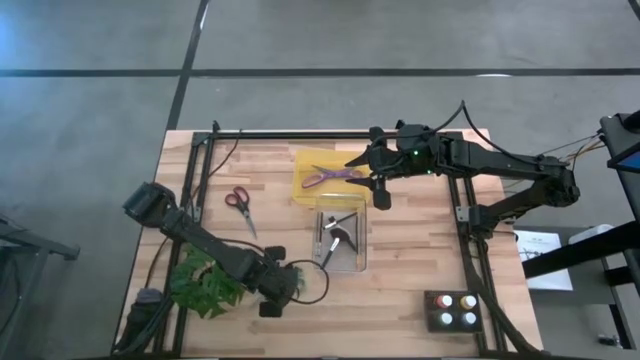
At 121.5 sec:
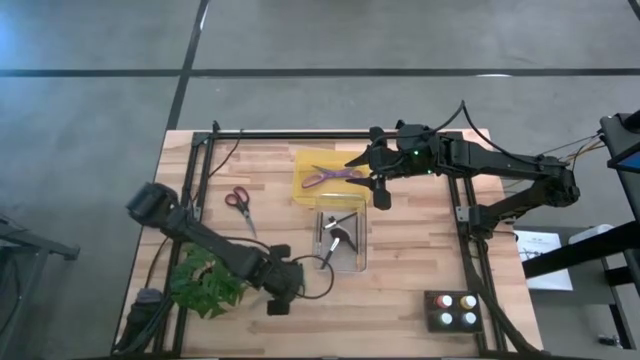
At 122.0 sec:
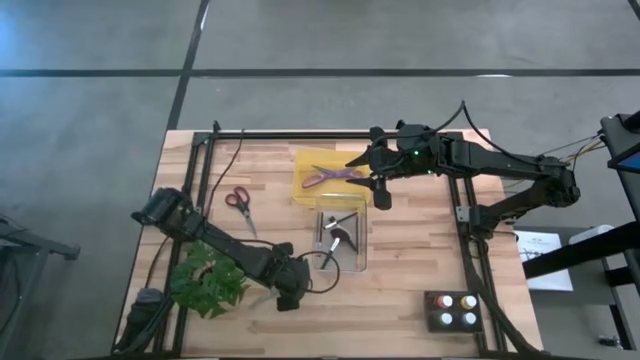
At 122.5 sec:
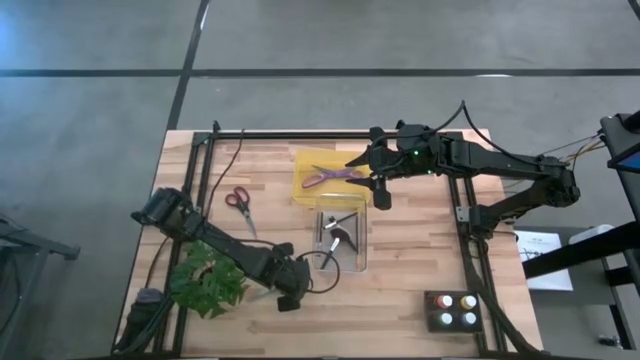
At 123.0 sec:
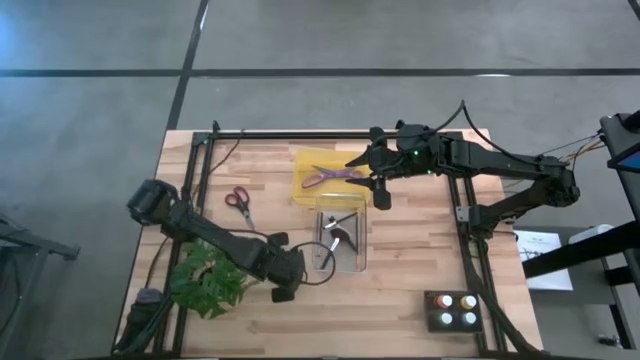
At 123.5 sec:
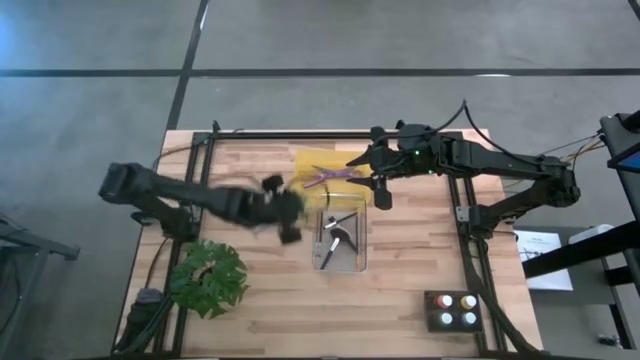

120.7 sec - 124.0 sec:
Task: Pick & Place Paint Supplies
Put the green scissors into the yellow bin

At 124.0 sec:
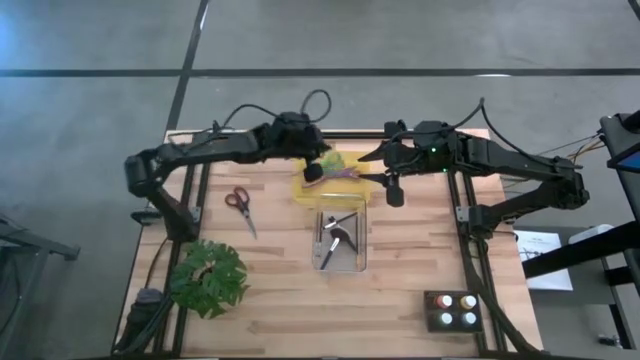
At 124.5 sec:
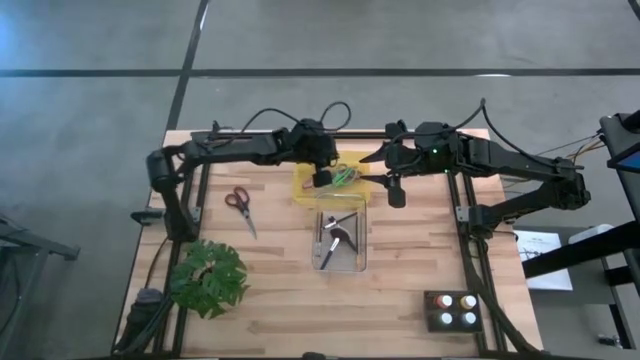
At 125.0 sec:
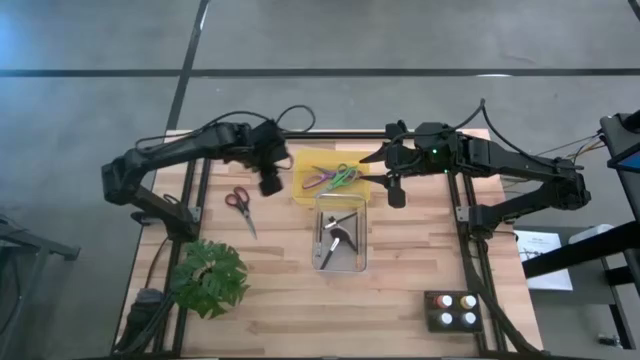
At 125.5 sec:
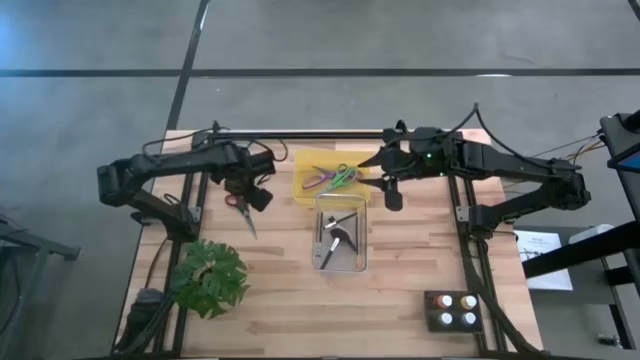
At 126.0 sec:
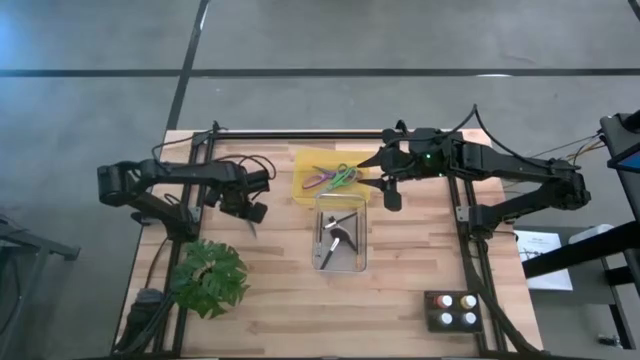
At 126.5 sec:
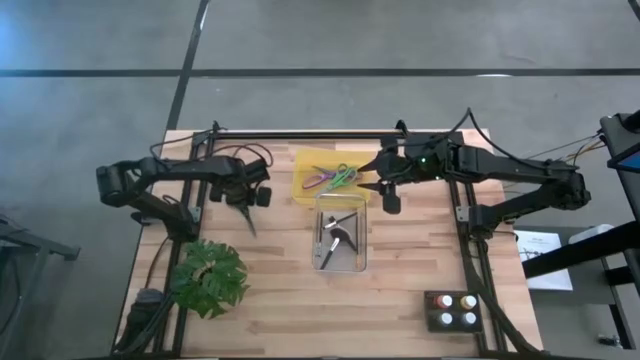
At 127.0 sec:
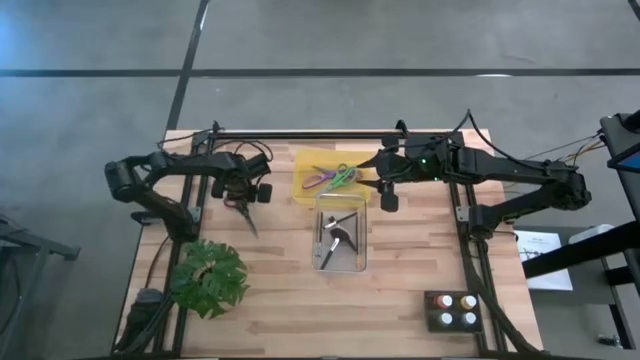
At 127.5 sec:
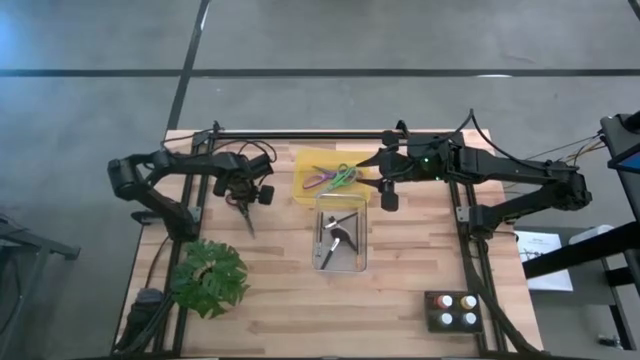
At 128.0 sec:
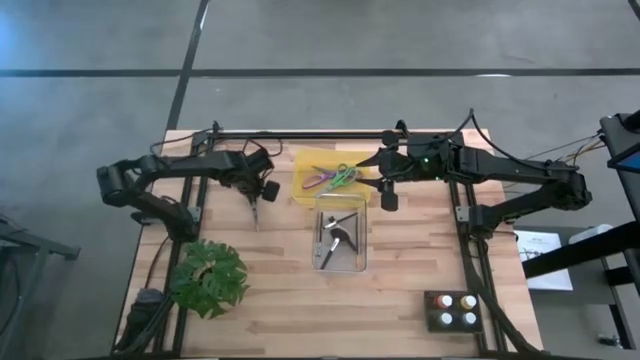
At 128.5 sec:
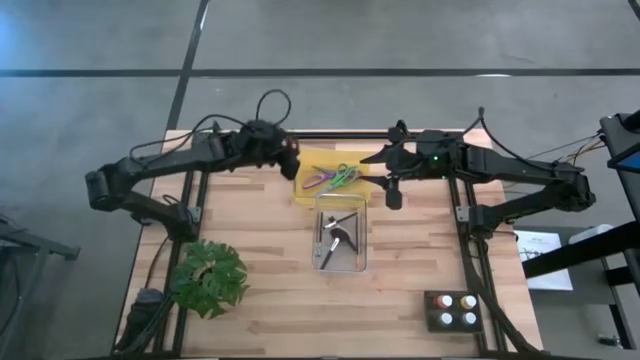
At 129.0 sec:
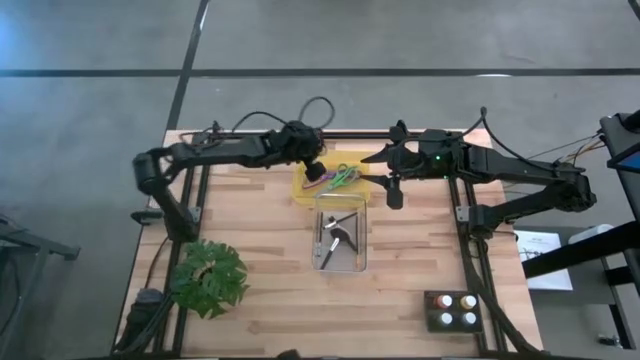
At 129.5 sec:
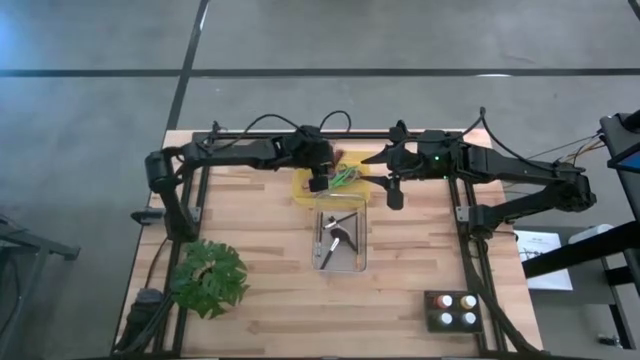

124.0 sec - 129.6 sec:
Put the black scissors into the yellow bin

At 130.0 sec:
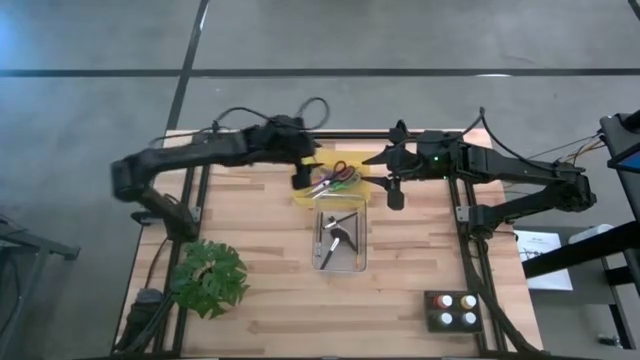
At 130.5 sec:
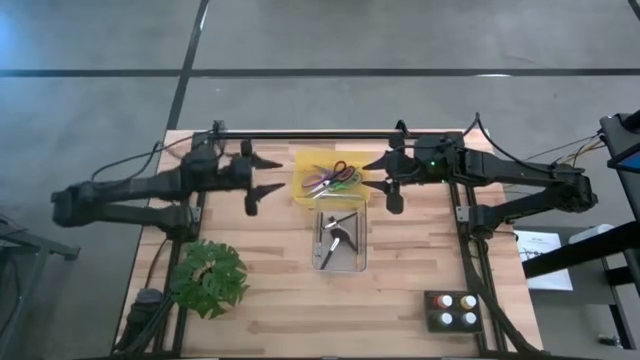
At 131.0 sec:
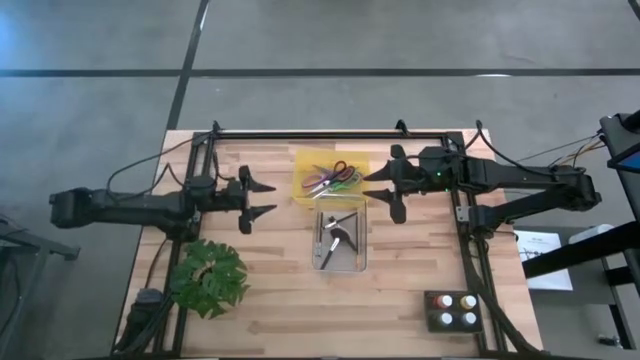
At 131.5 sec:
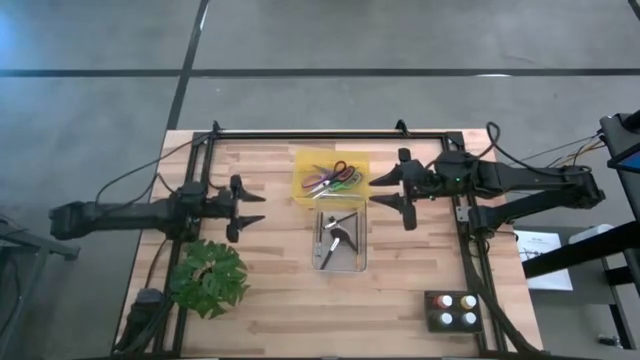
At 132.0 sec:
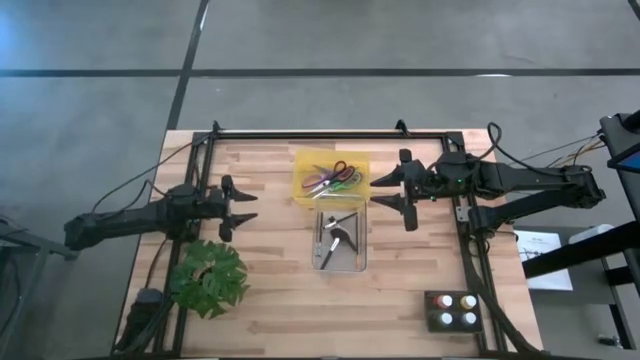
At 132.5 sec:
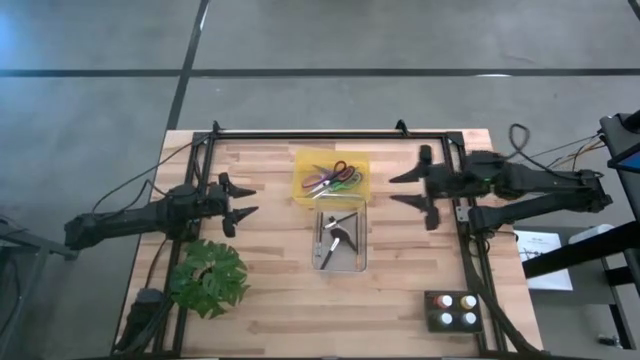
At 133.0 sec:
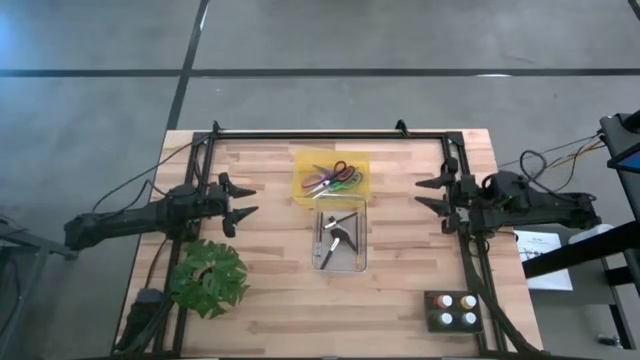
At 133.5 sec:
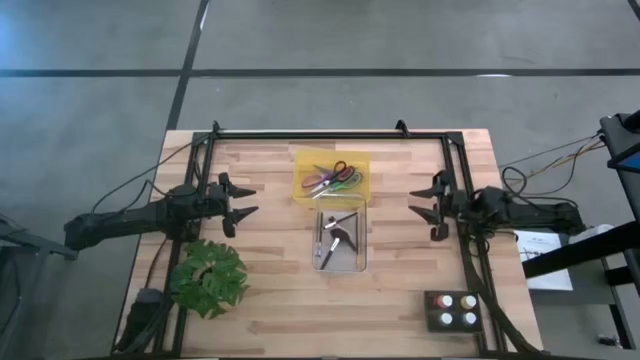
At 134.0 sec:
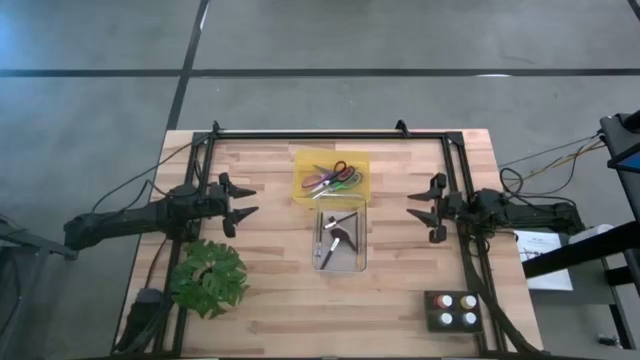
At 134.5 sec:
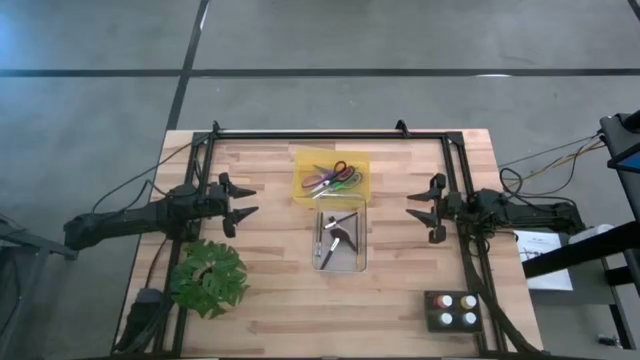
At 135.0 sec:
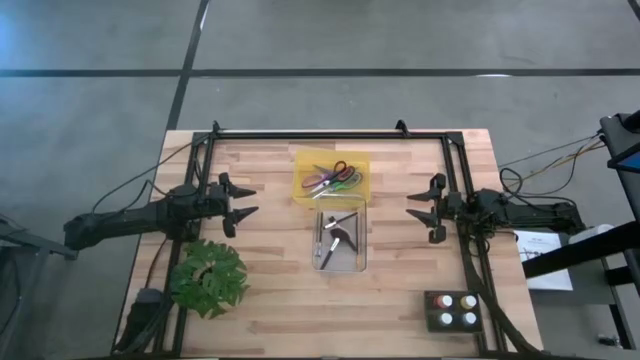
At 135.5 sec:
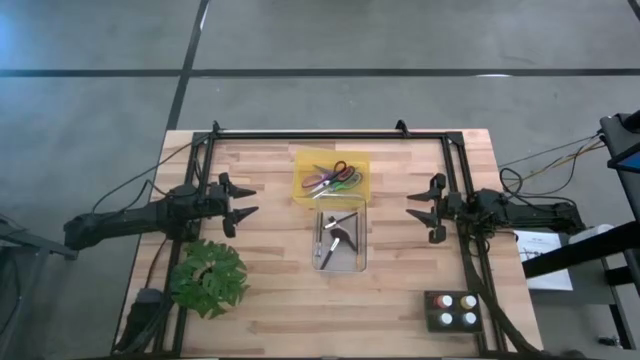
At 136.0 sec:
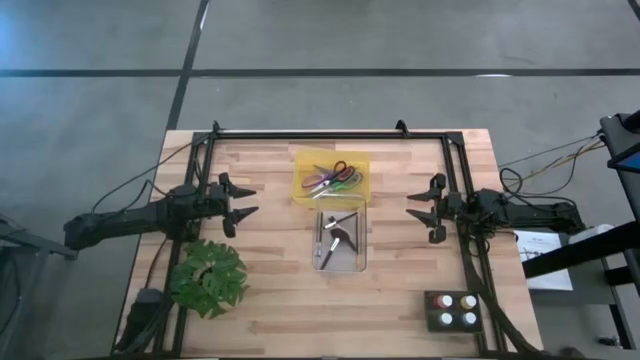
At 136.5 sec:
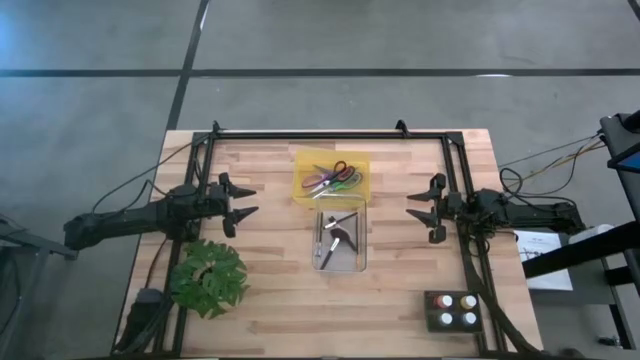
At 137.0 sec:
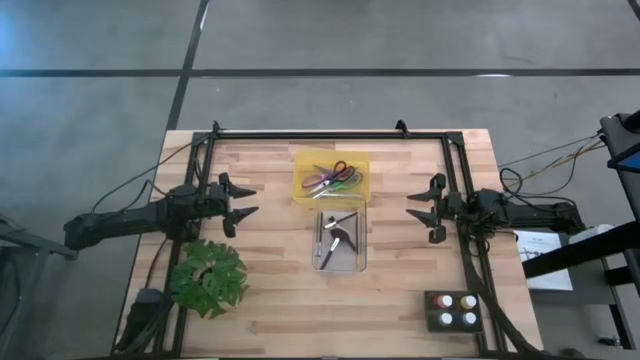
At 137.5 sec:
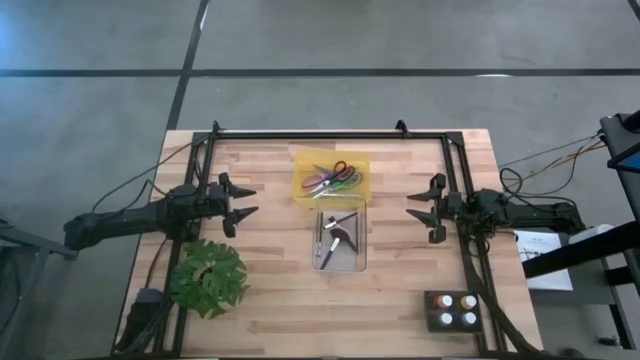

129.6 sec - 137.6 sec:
Return to Home Position

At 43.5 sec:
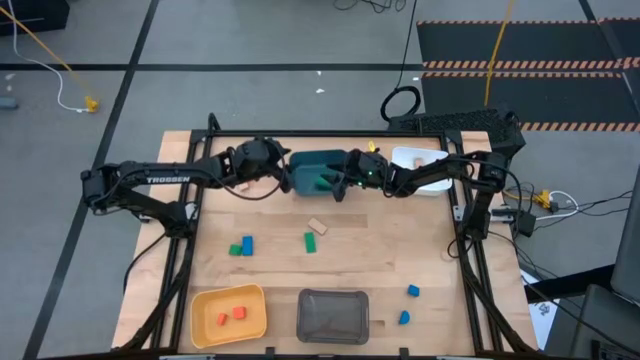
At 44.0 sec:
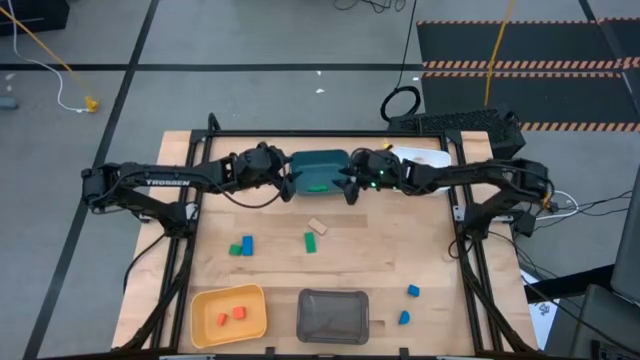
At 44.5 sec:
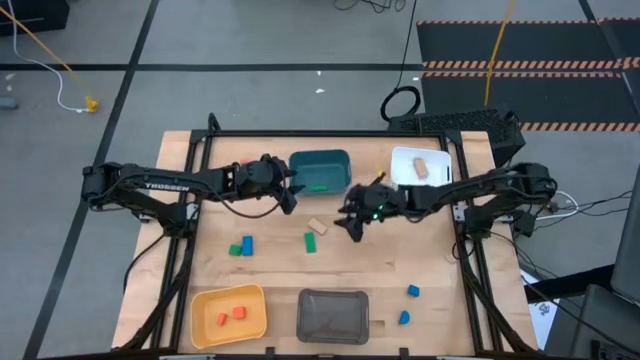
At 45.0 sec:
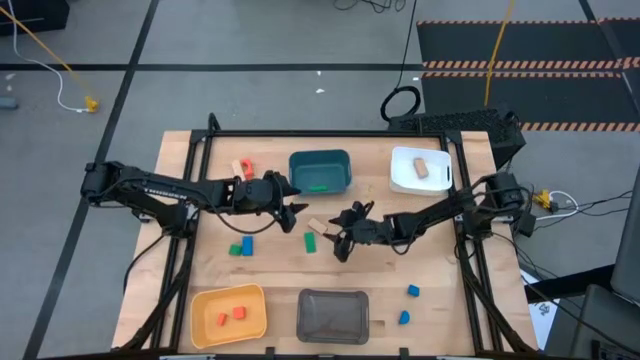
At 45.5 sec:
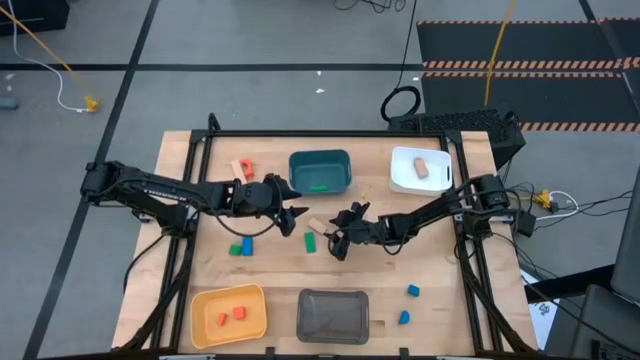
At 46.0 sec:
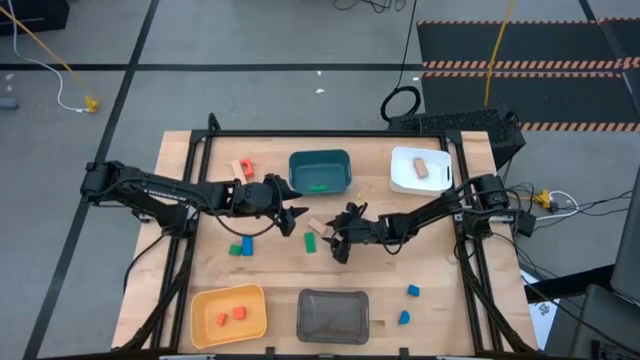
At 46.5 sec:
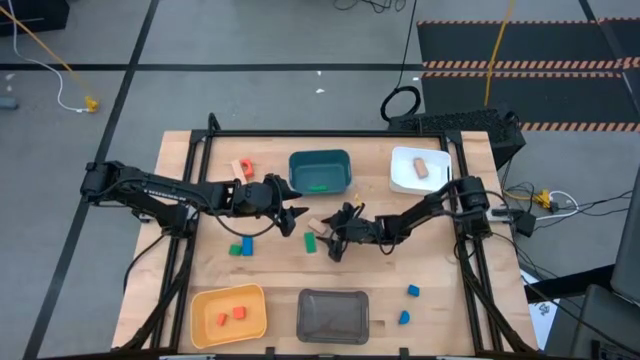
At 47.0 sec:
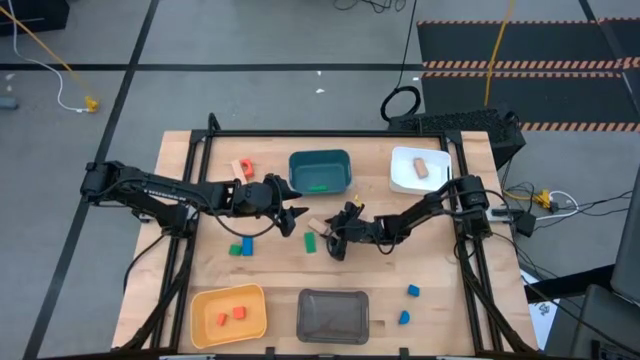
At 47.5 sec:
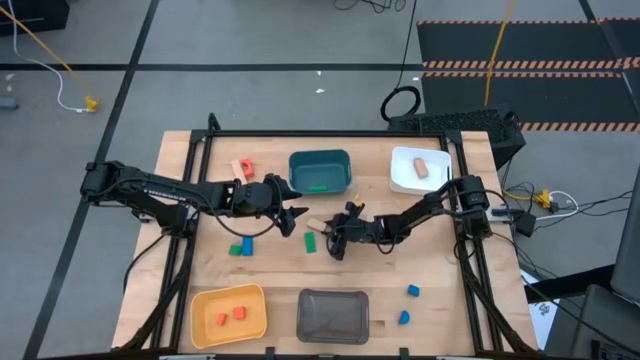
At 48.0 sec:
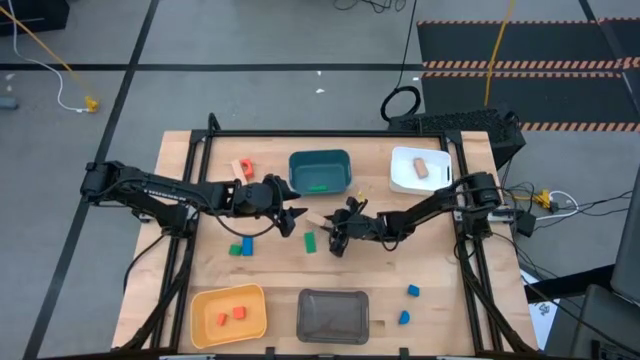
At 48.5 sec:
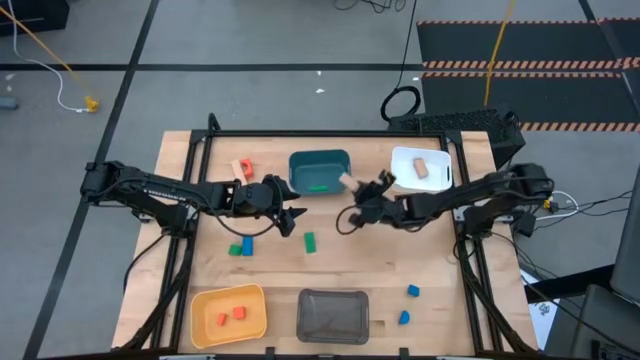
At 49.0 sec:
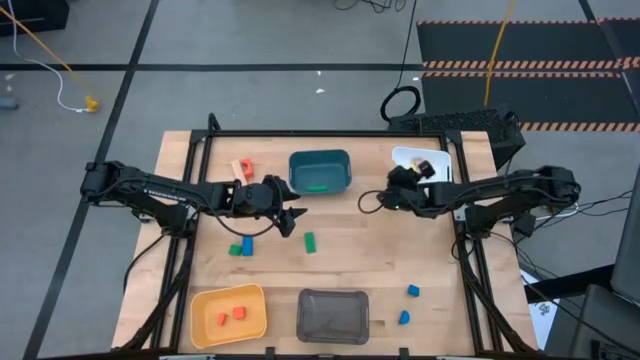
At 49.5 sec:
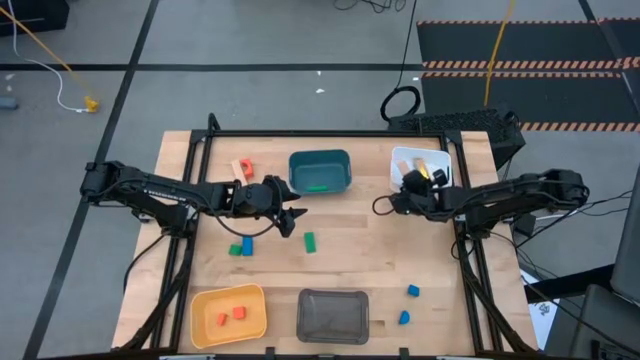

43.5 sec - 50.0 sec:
Task: Sort & place blocks by color
Put the right brown block into the white bin
